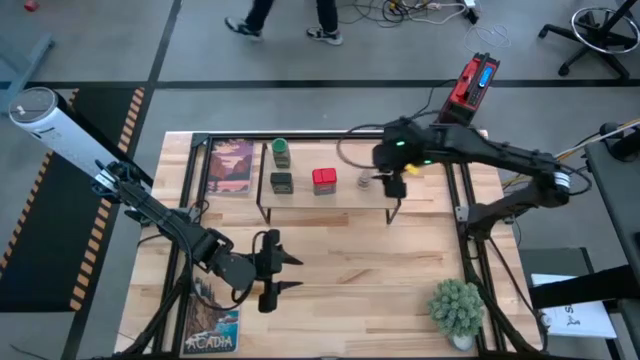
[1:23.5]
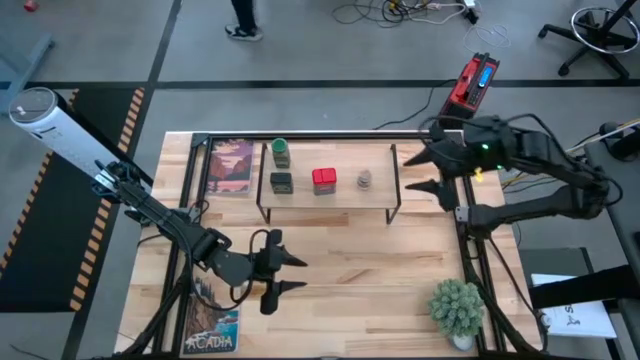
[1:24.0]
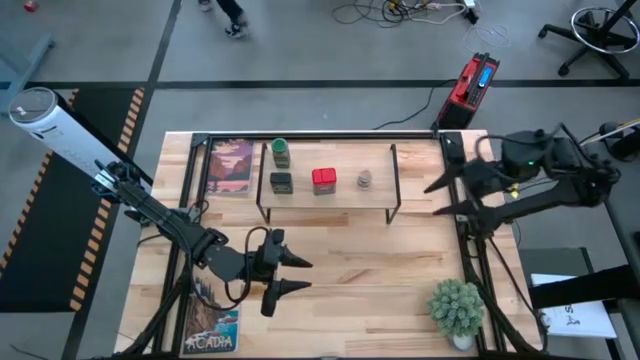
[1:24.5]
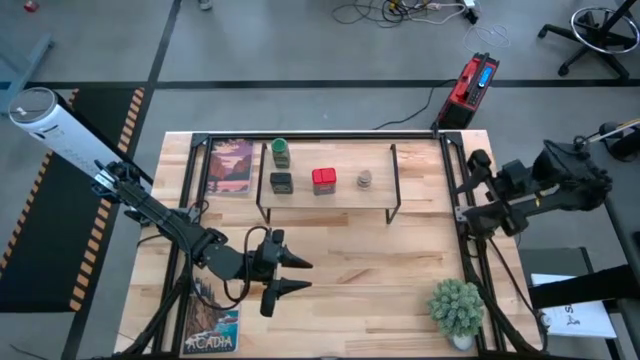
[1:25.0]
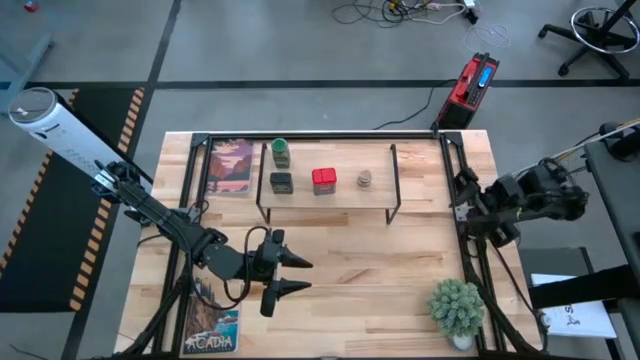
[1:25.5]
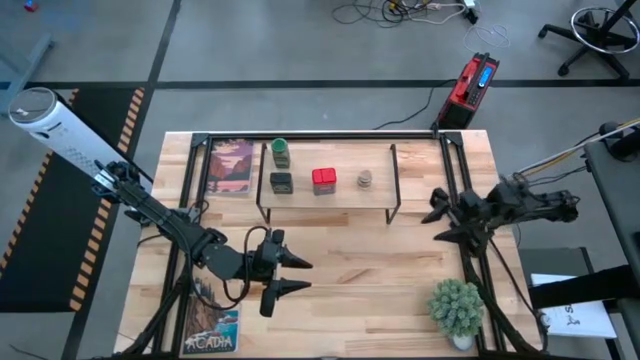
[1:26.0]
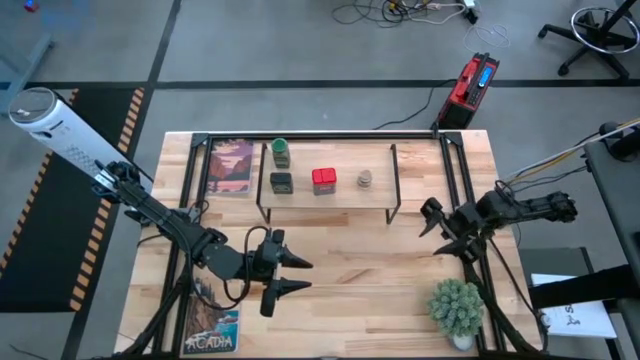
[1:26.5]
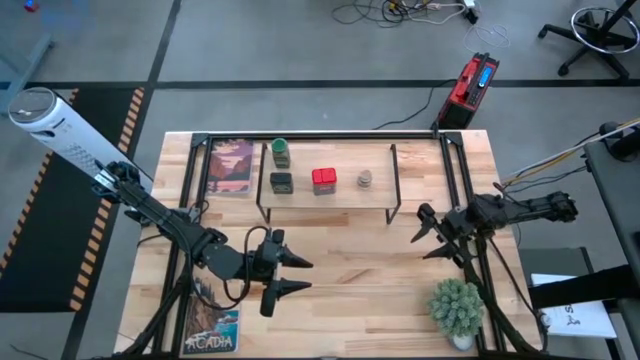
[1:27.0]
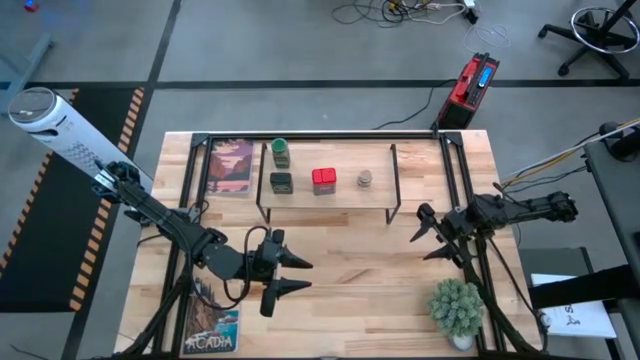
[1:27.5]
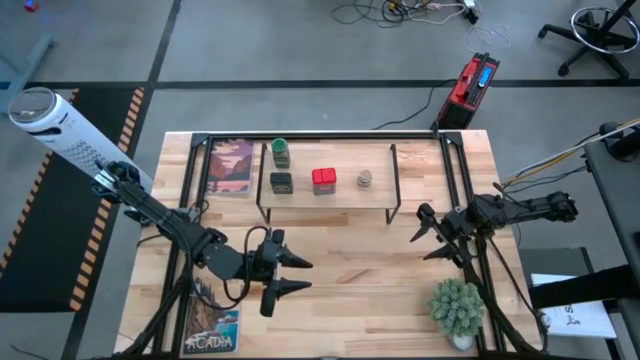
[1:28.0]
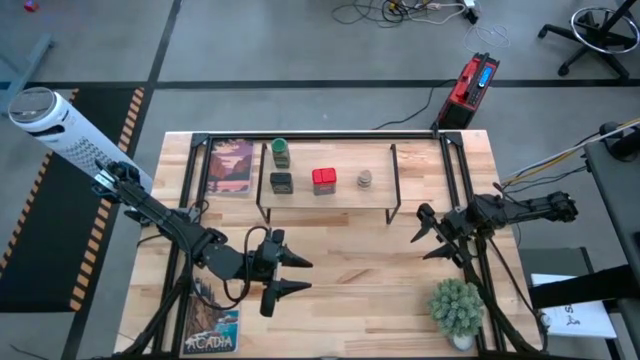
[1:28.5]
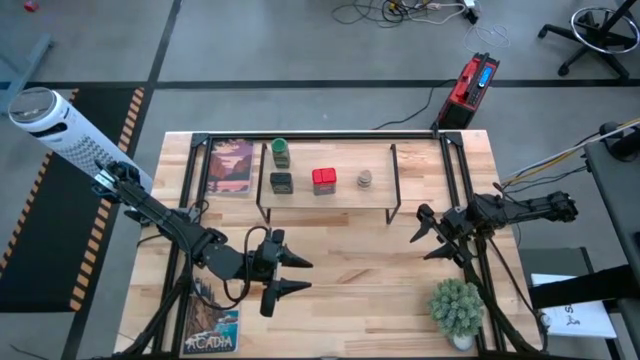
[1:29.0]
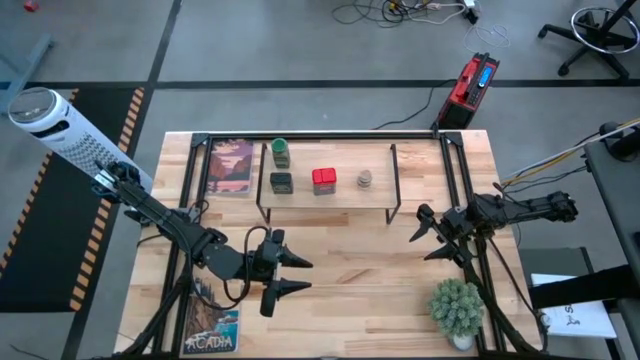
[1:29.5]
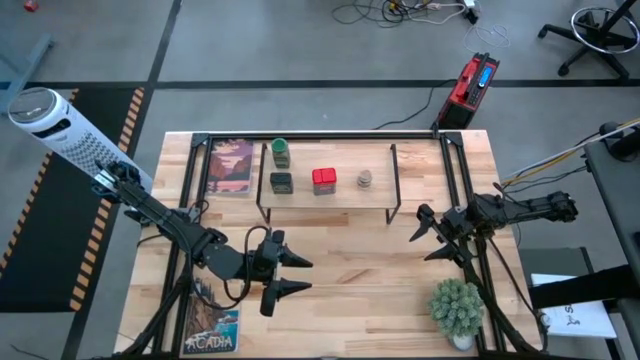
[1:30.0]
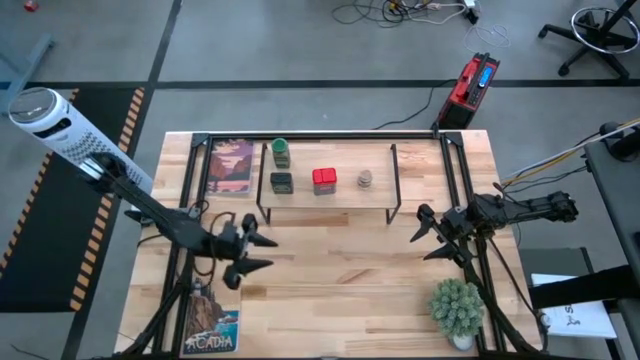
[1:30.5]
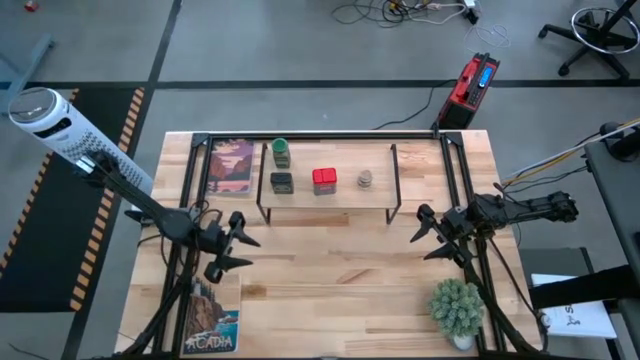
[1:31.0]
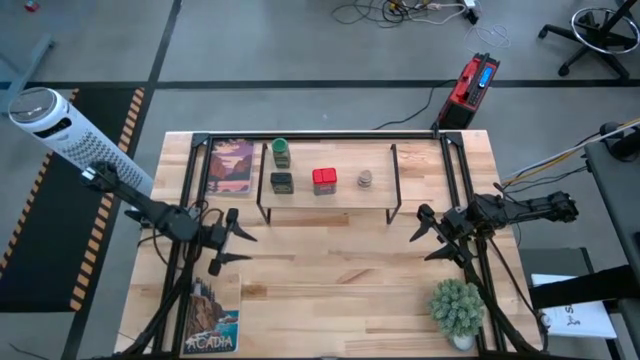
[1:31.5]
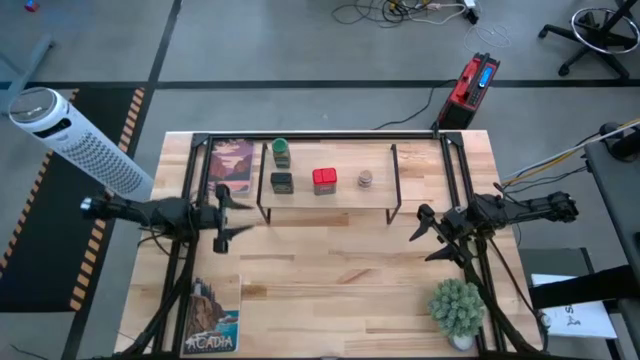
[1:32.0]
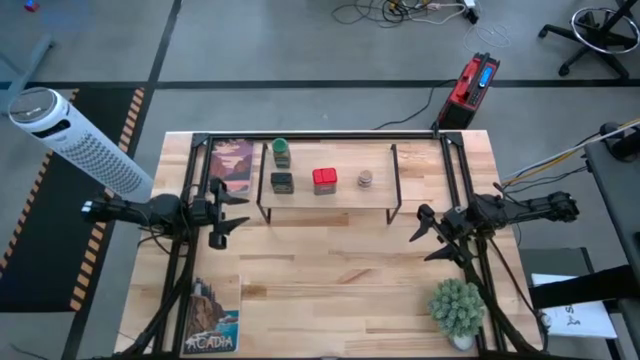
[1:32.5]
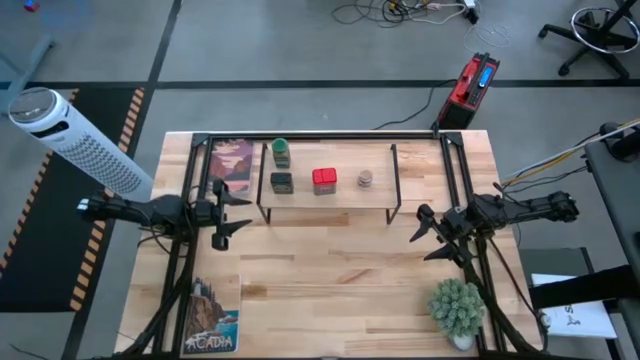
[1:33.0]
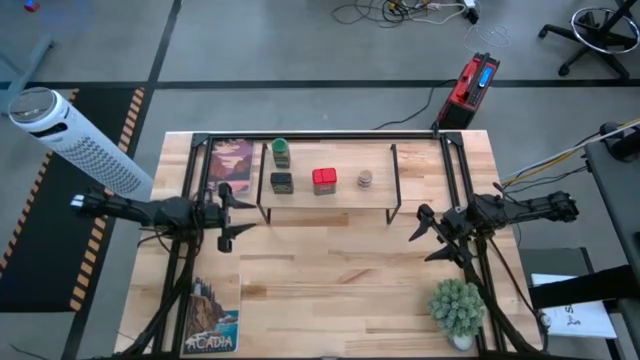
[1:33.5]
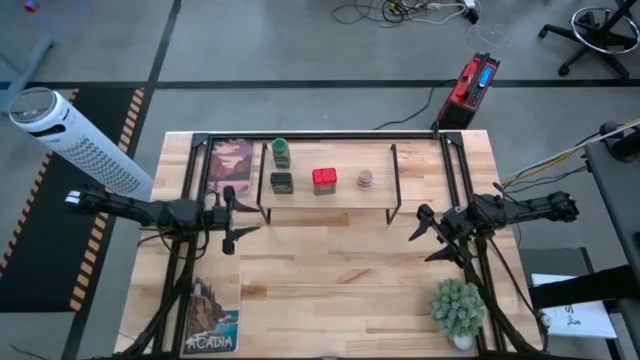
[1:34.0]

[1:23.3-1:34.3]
Task: Shelf spices
Return to Home Position

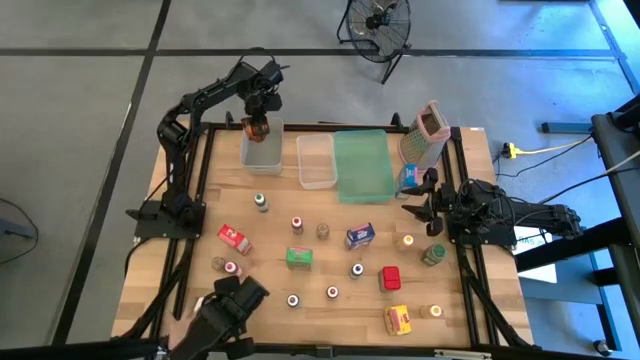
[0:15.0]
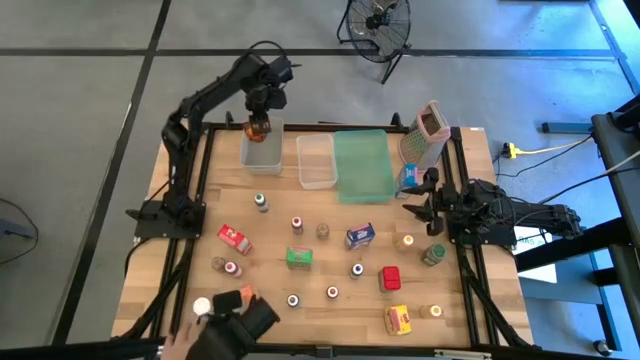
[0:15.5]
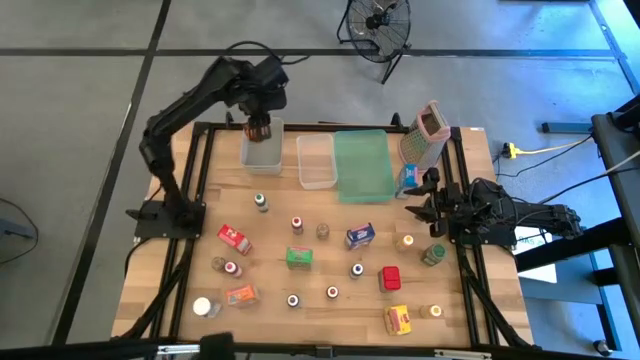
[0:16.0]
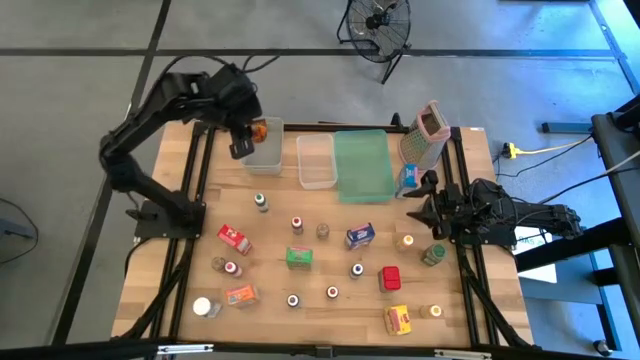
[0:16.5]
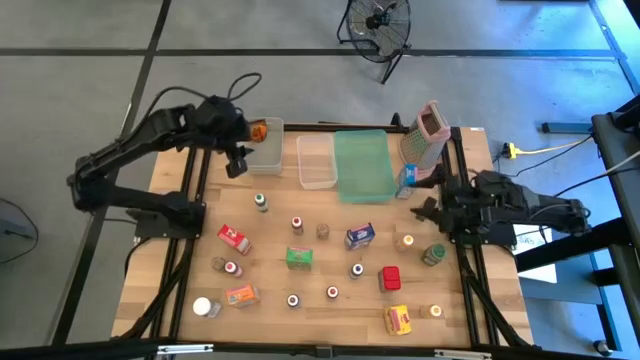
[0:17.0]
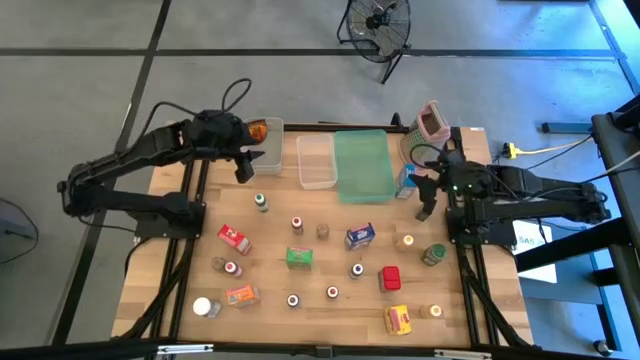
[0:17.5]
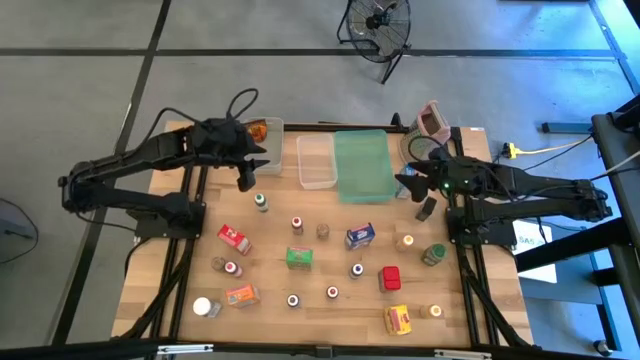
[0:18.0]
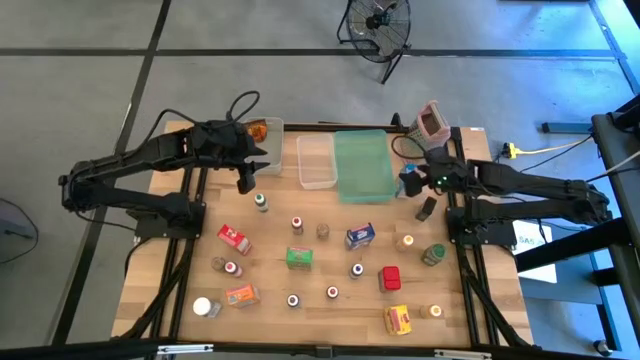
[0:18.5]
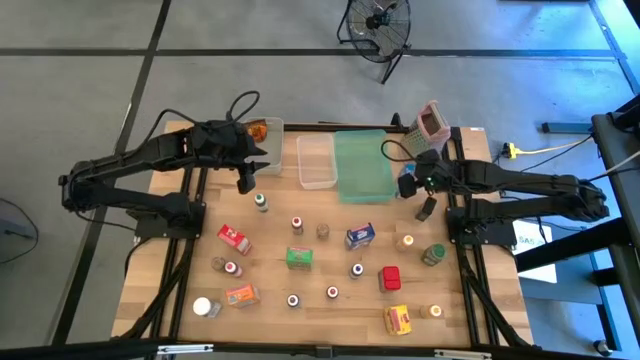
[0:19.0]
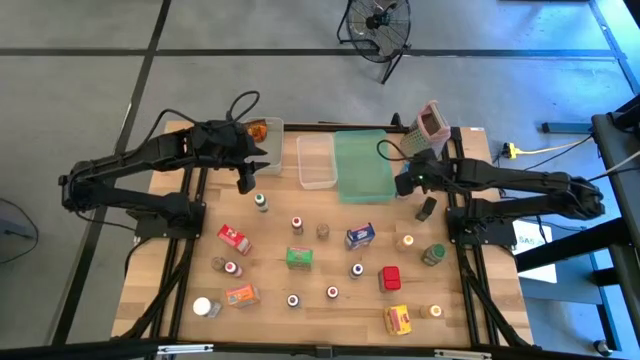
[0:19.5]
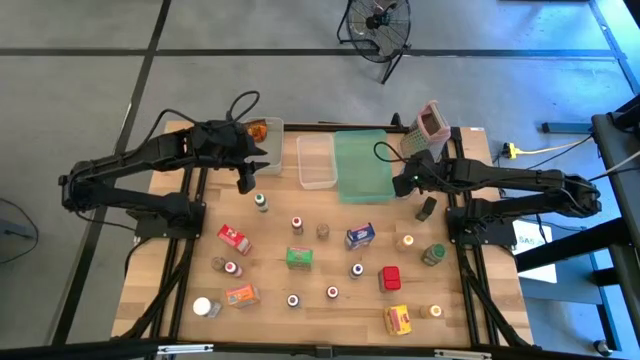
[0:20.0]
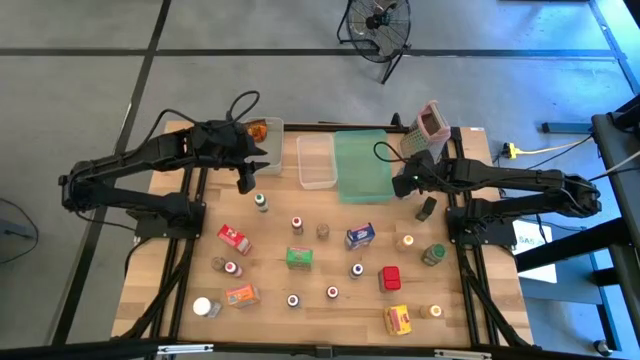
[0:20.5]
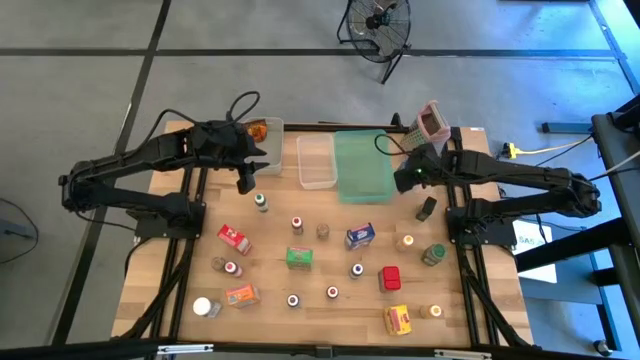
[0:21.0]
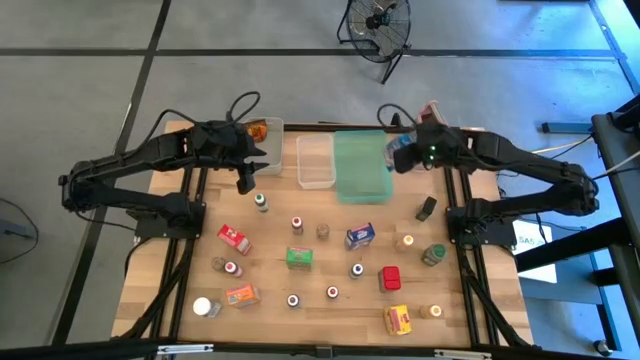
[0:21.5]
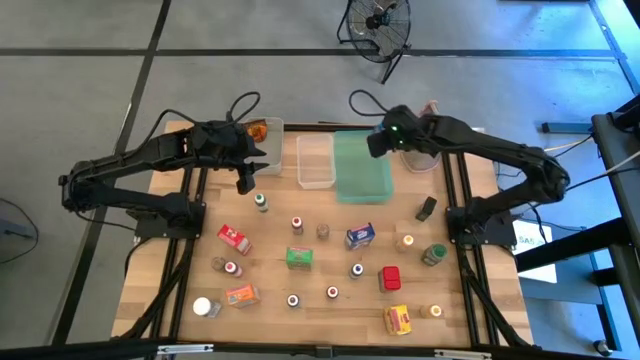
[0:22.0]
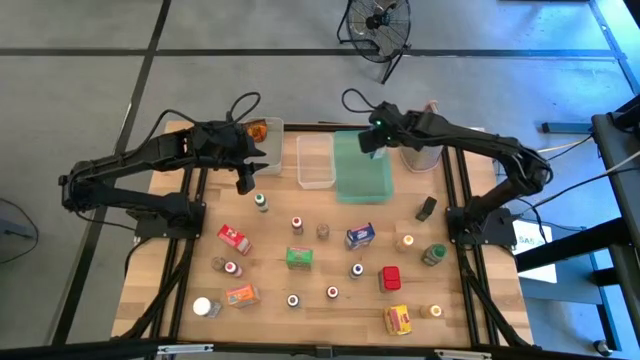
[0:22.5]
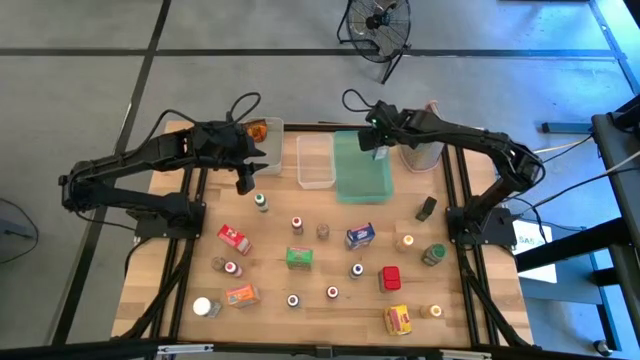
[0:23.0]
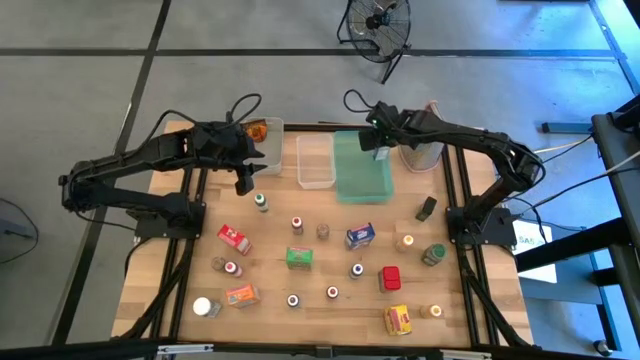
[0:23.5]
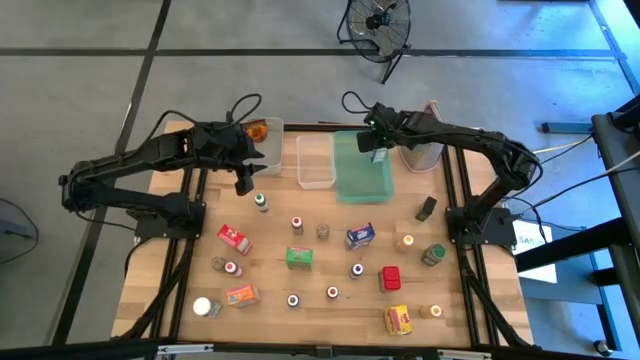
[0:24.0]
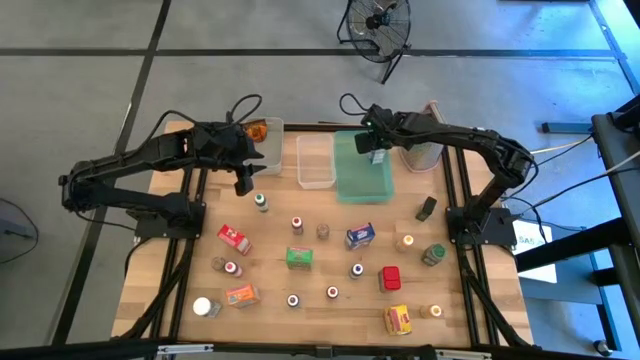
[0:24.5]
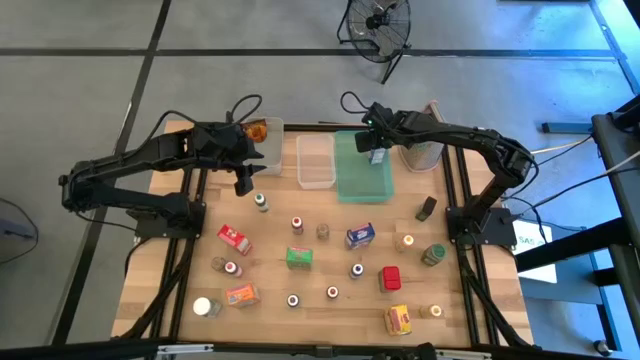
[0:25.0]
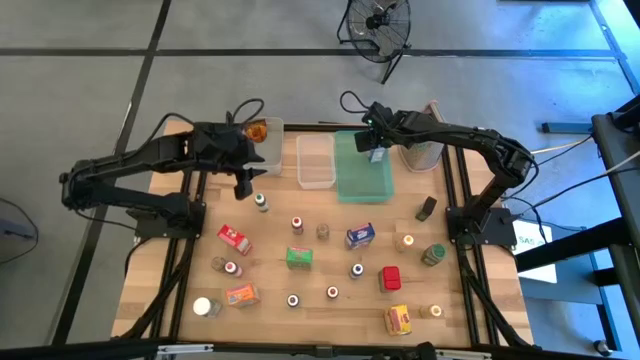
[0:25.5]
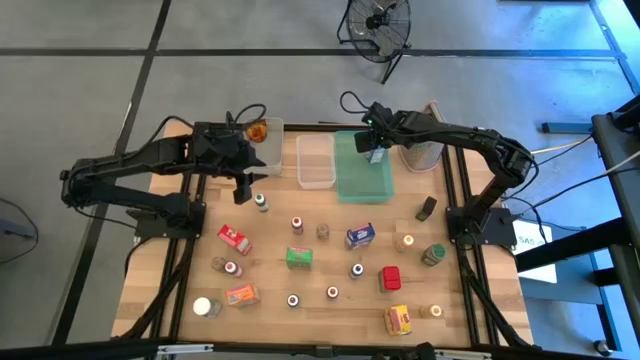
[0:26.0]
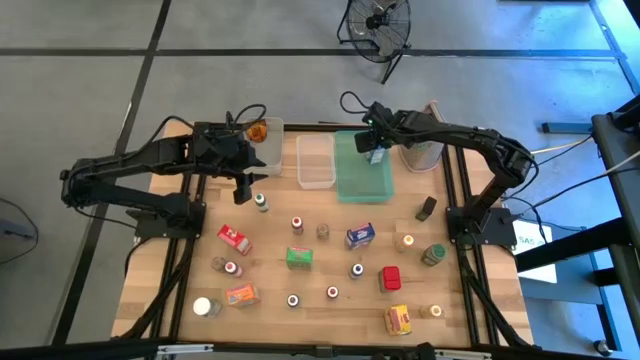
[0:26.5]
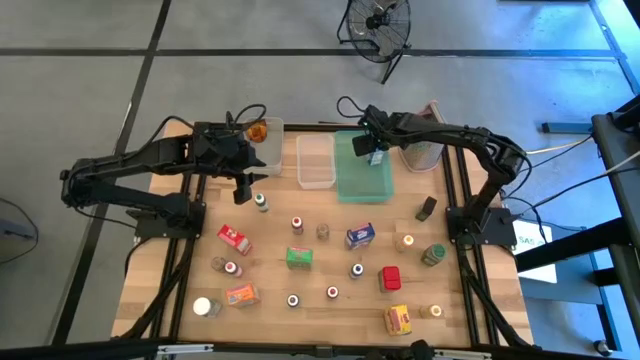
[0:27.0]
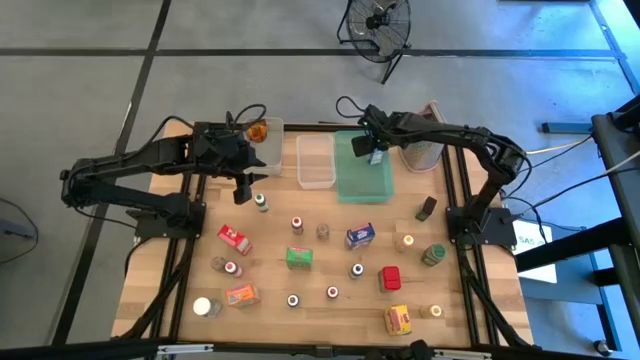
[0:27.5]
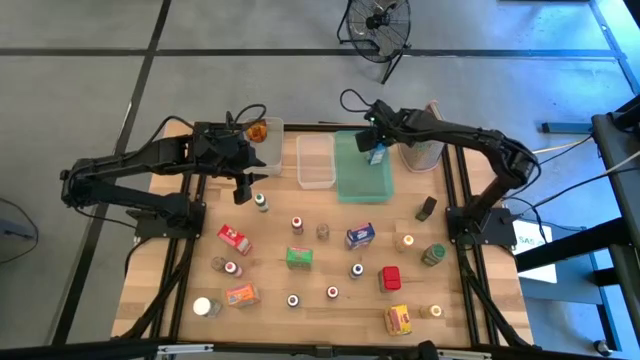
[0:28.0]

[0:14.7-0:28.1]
Task: Pick & Place Kitchen Items
Put the light blue cereal box into the green bin
